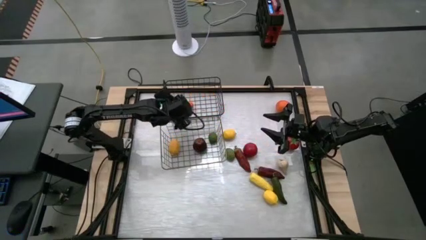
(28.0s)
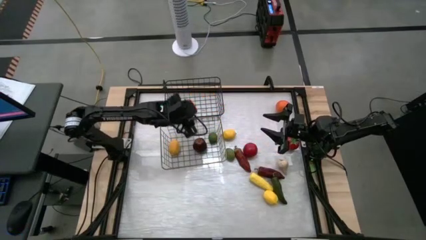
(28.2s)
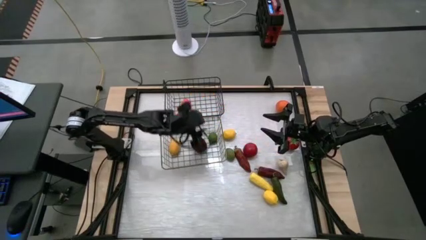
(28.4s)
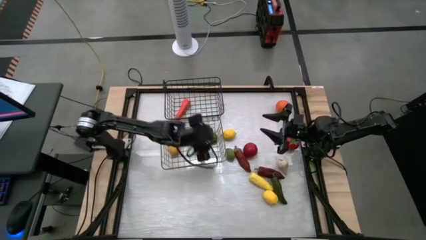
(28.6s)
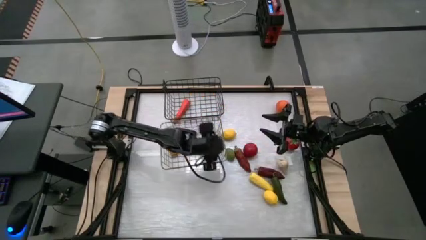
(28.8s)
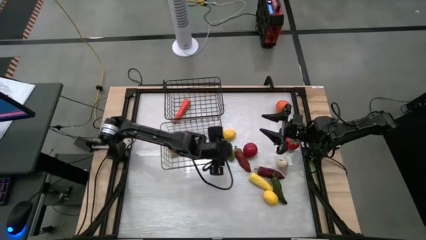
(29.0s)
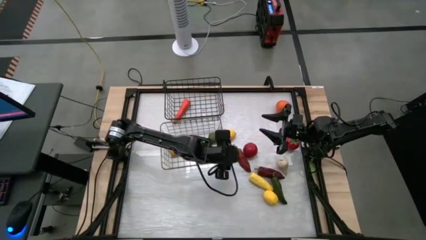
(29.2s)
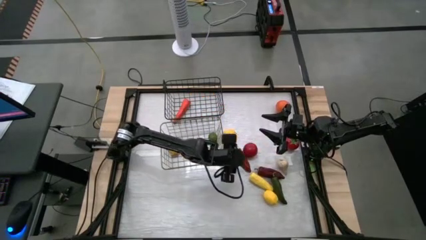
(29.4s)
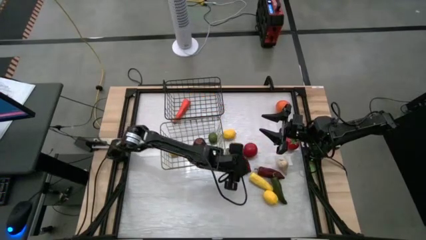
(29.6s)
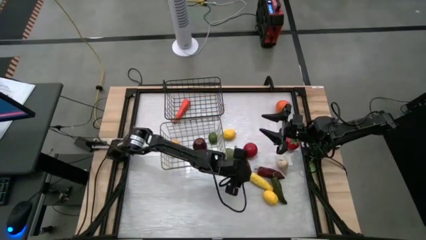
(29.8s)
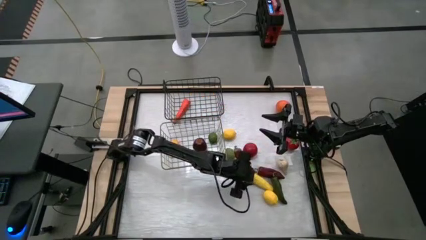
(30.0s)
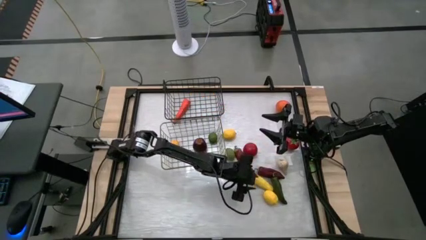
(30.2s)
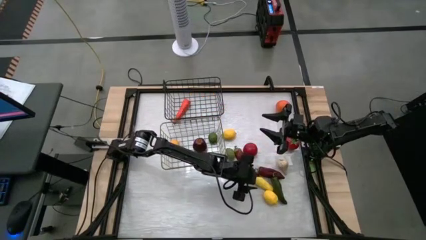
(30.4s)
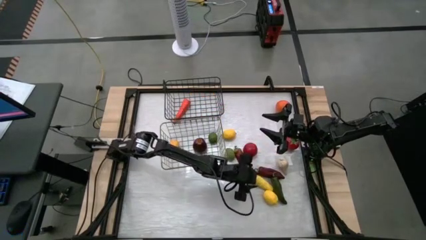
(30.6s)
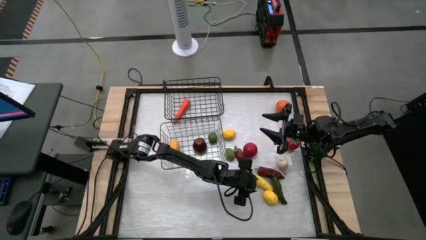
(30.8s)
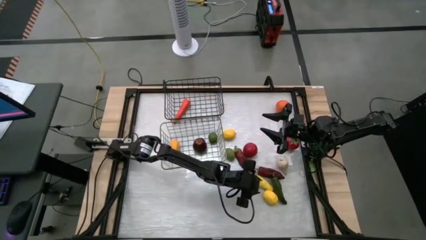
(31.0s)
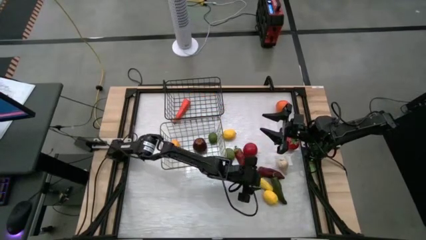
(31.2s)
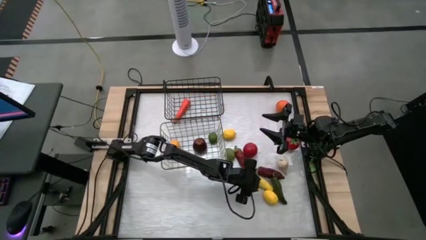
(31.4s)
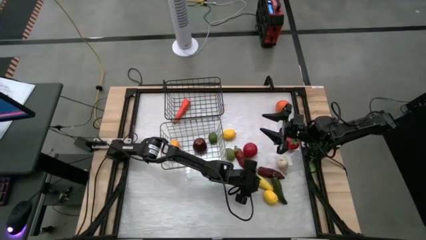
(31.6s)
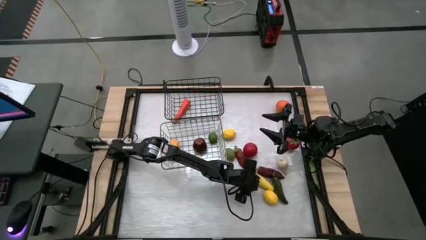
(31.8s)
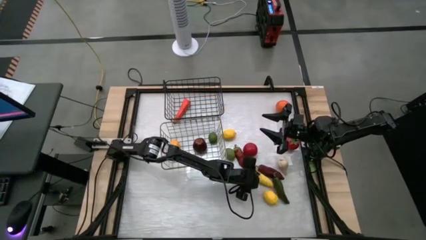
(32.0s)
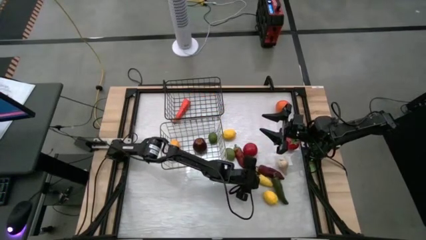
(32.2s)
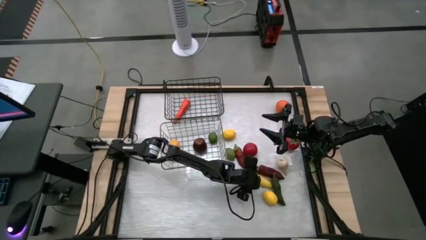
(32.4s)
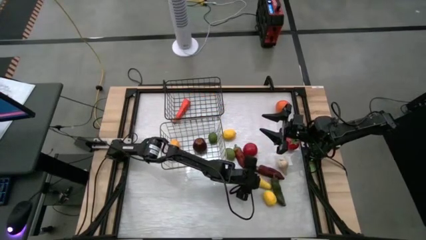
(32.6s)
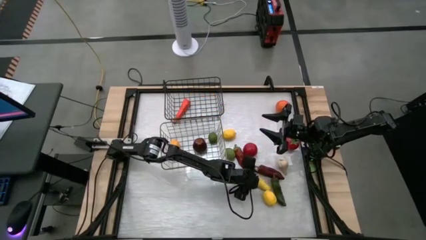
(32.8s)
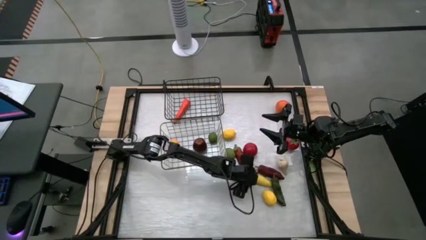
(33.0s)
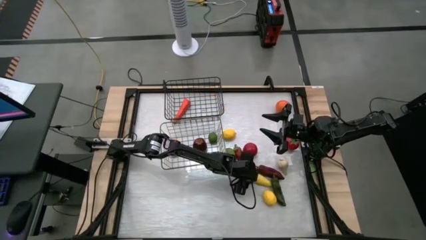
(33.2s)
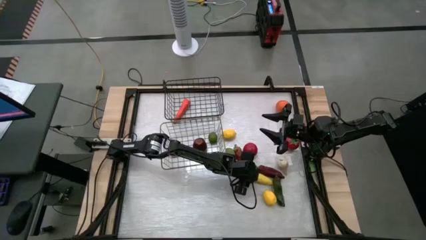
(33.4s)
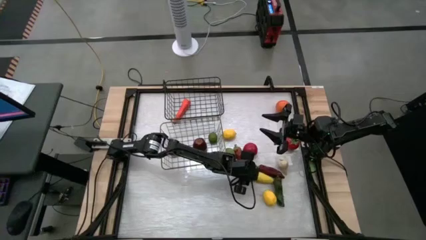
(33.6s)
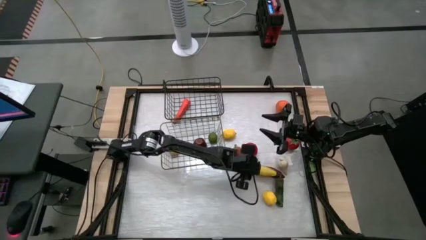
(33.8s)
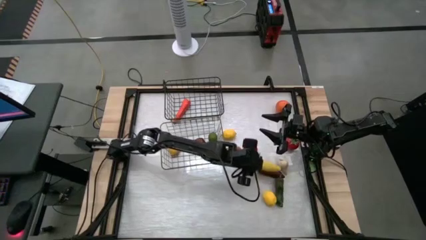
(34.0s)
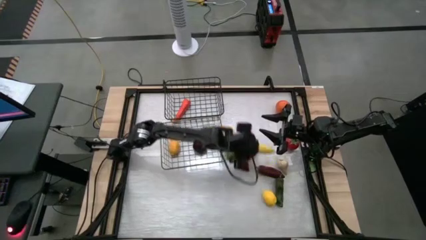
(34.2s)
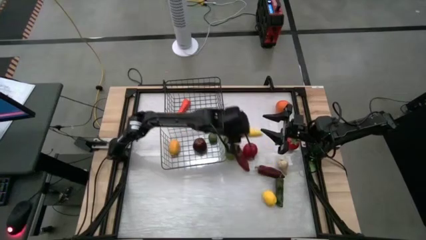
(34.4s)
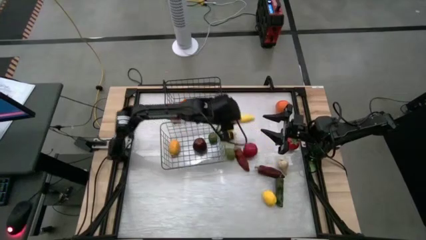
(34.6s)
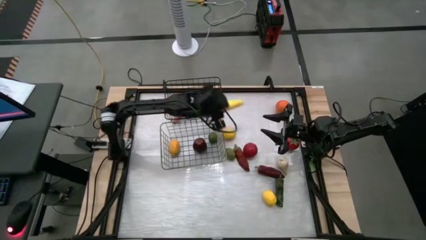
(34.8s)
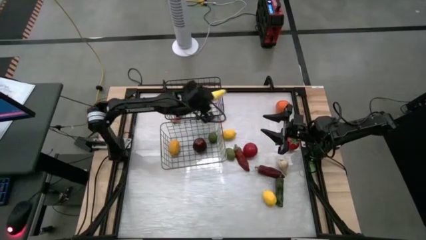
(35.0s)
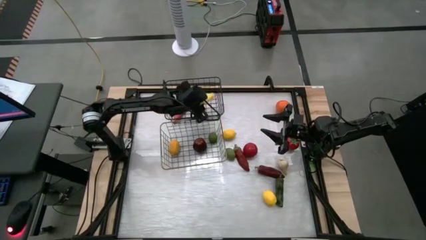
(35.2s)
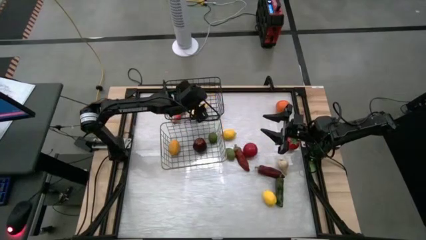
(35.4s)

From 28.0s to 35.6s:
Task: Sort produce into baskets
Put the corn into the black wire basket

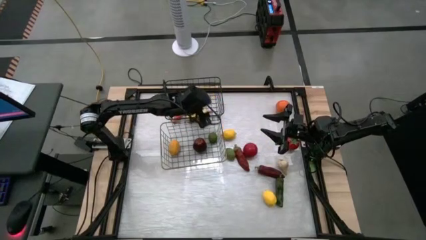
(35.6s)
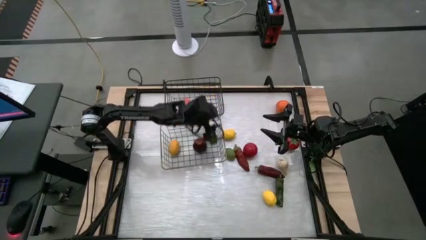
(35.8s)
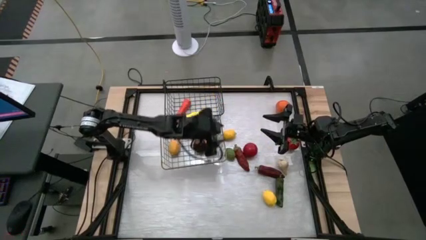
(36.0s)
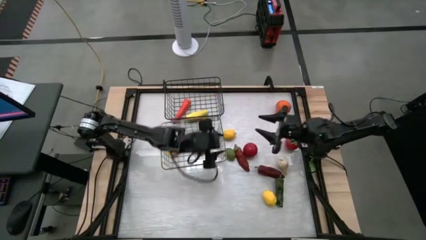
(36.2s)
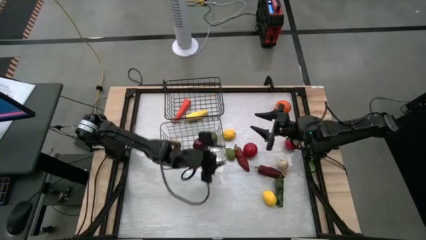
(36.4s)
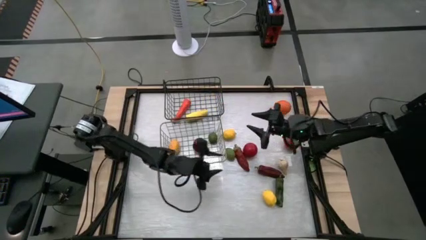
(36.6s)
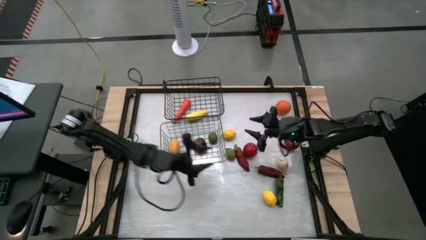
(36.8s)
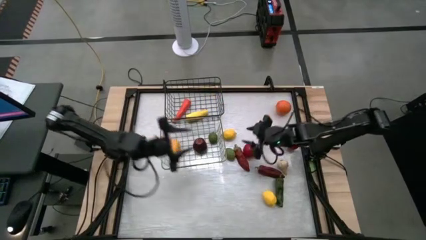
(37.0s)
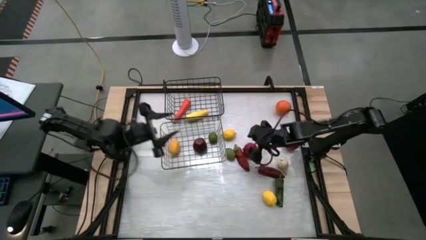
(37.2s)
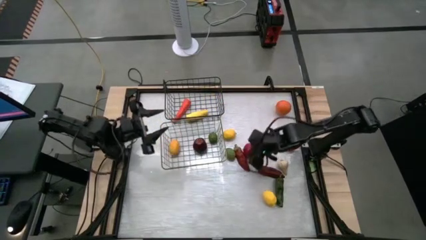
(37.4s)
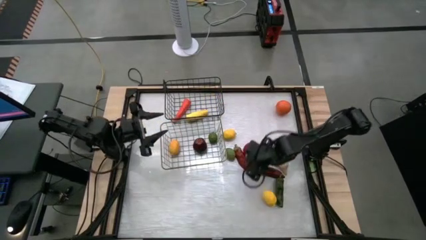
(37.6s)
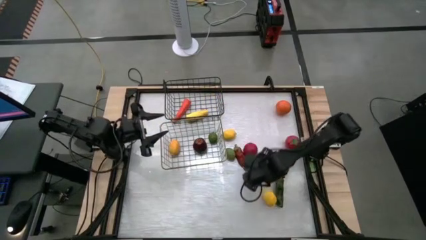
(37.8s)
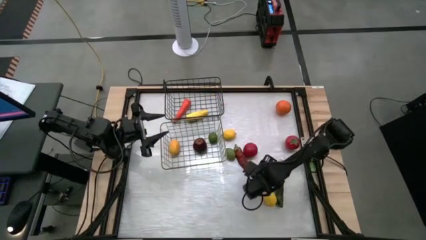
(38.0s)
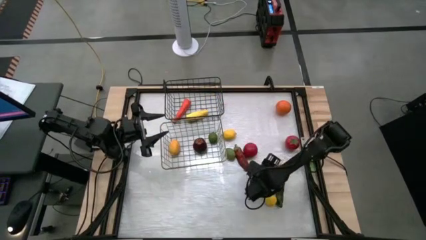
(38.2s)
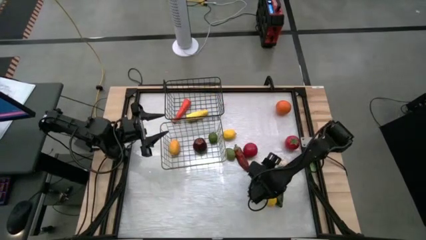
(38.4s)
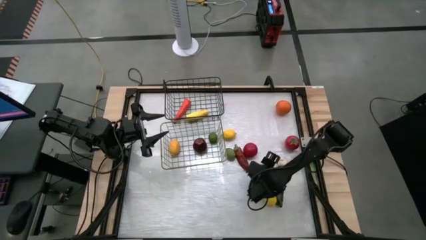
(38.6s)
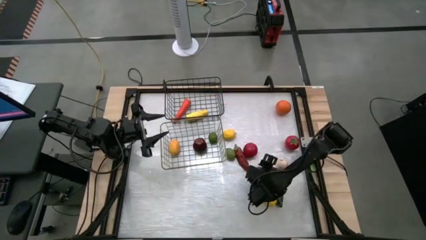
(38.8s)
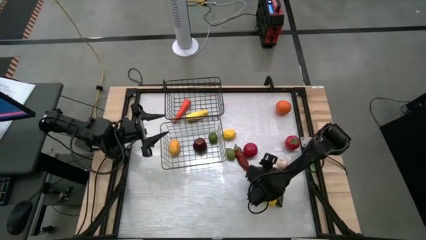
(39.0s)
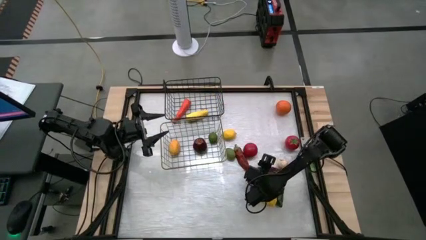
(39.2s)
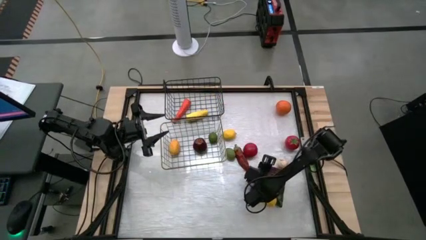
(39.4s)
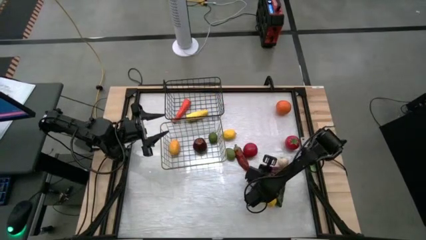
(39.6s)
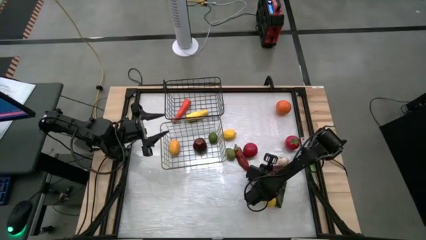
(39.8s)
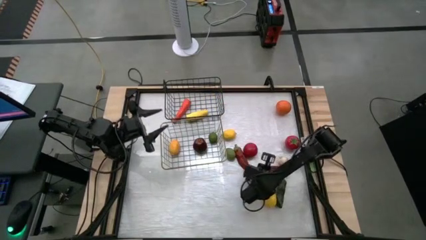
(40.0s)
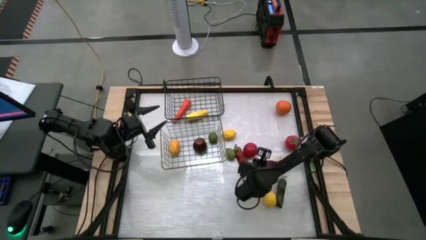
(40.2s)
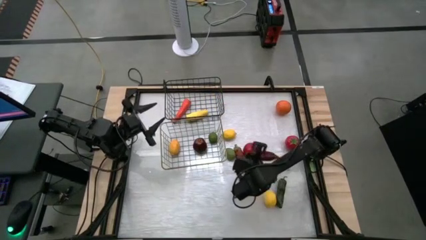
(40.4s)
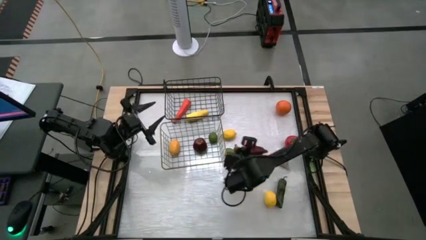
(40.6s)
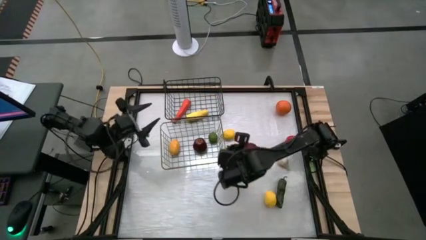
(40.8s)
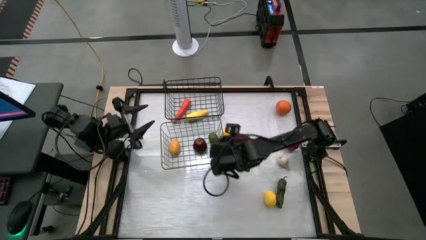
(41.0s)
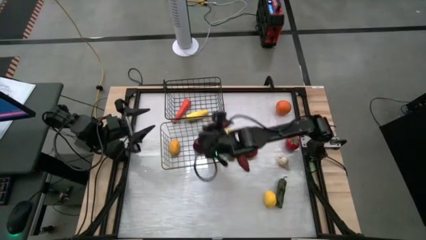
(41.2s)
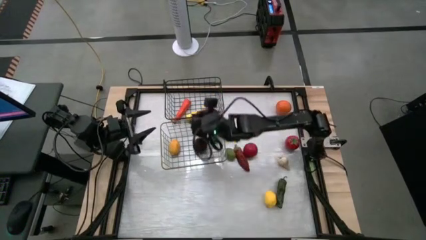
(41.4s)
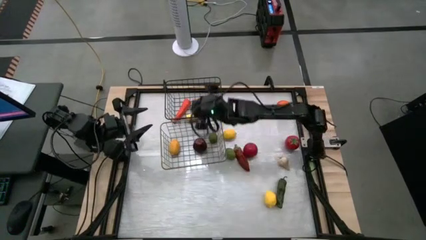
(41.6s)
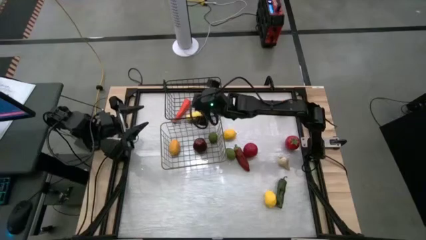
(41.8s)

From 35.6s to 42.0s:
Put the right red chili pepper into the black wire basket

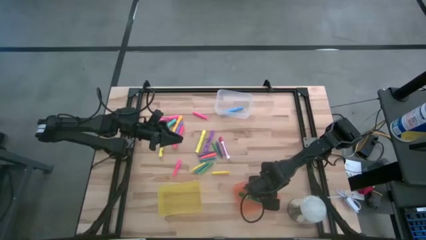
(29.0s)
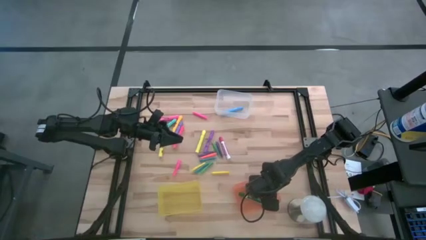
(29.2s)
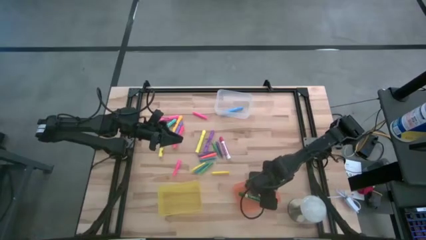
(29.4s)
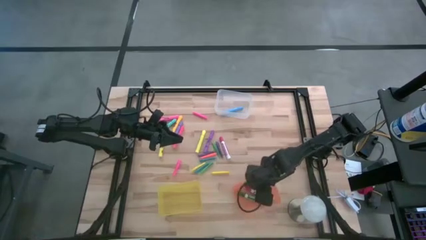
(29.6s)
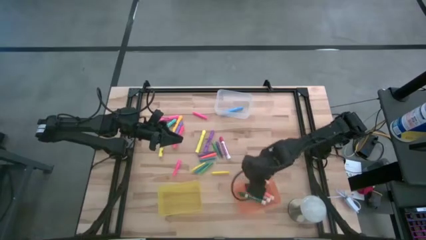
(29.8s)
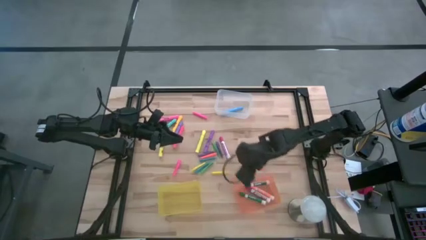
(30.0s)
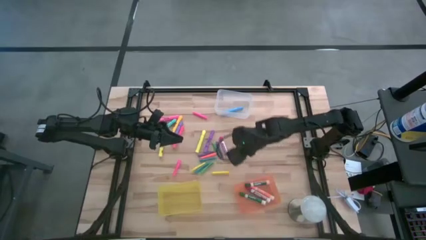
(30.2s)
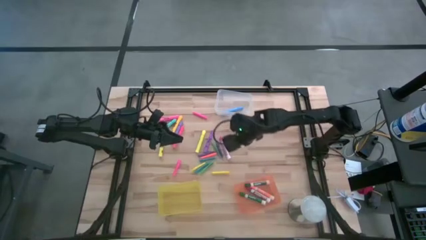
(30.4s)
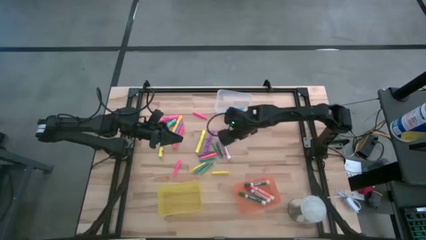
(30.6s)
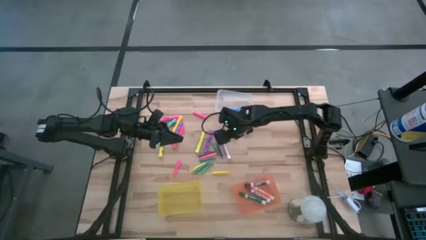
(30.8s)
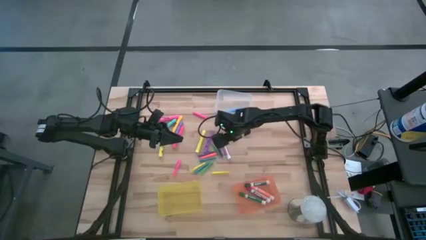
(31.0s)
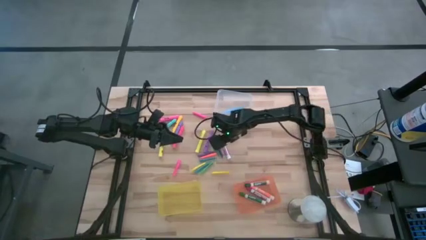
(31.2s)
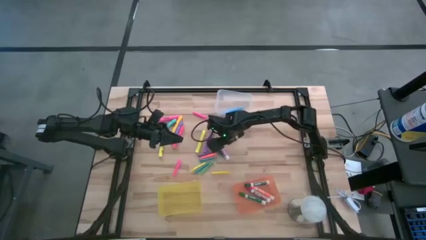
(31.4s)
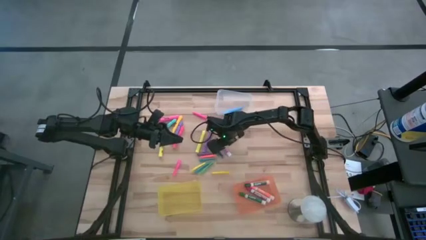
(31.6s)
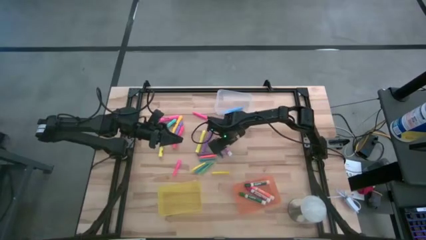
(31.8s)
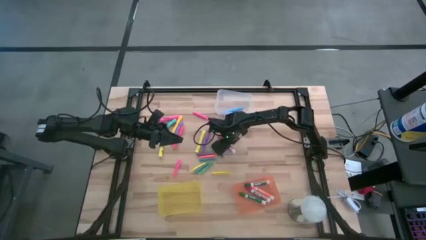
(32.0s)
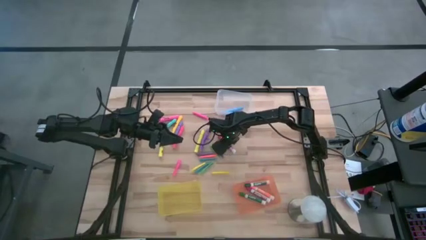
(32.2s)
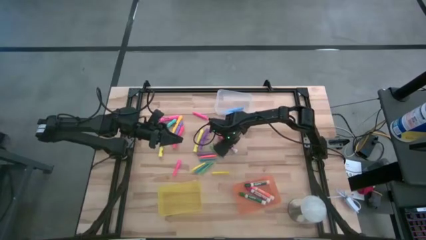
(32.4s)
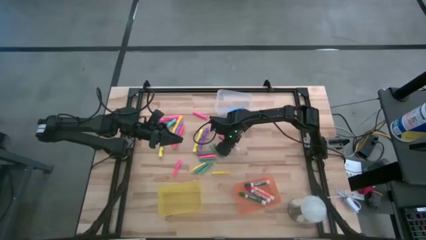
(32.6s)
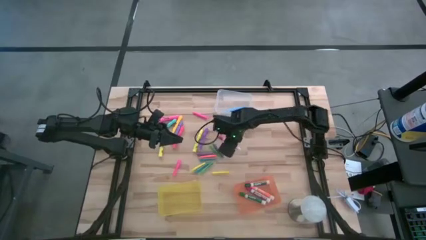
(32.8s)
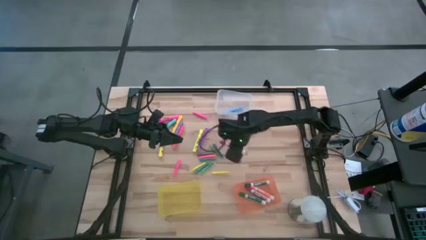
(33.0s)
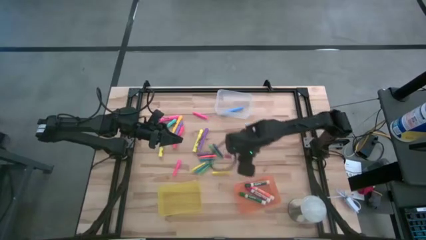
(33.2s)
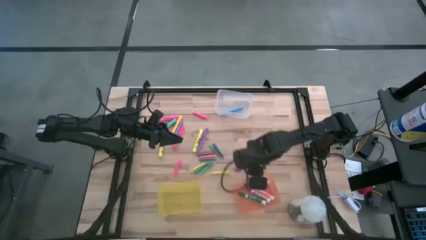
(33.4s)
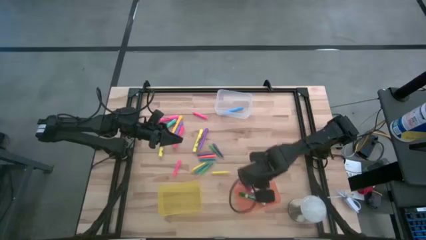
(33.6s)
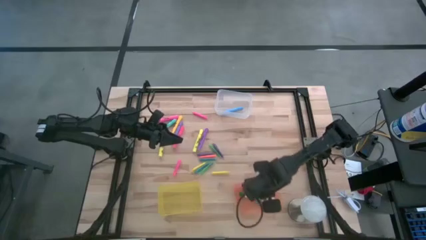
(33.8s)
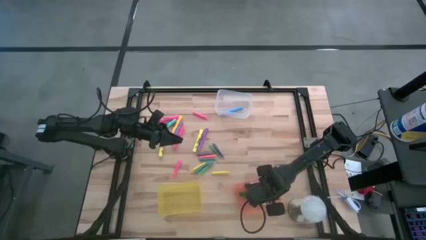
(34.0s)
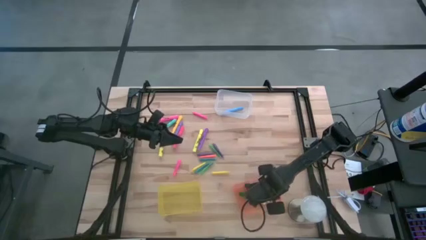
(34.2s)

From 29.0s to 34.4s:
Task: Pick & Place Markers
Put the pink marker pen into the orange bin
